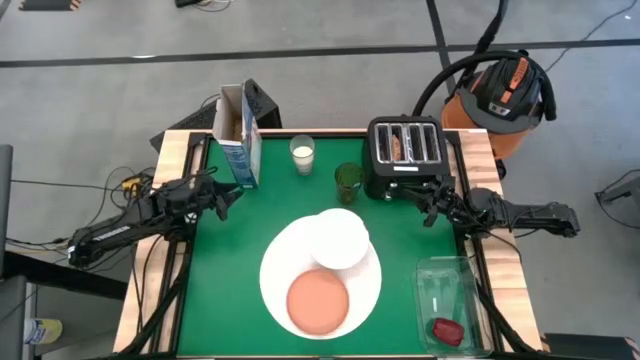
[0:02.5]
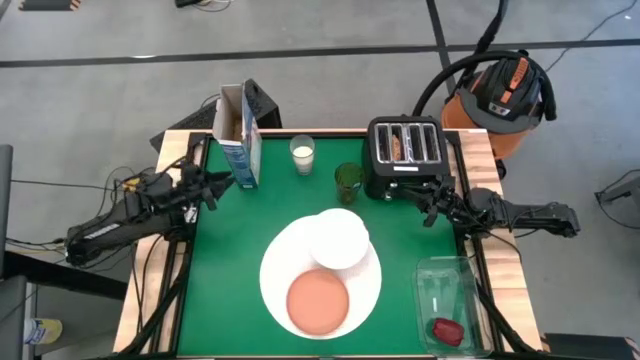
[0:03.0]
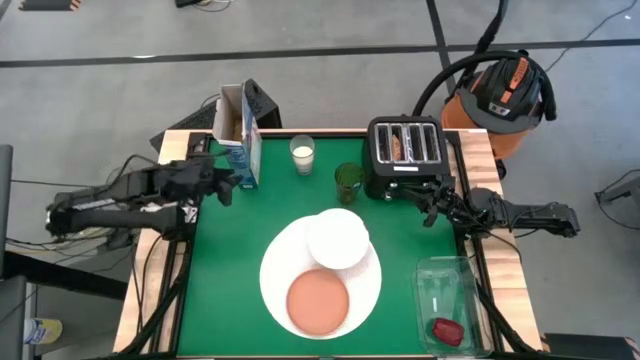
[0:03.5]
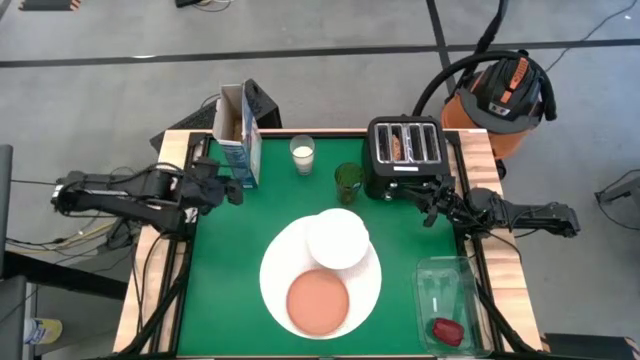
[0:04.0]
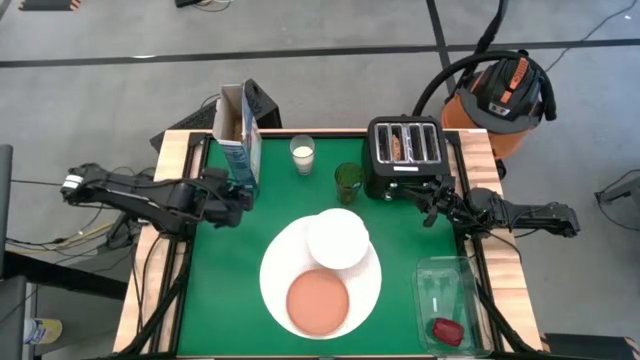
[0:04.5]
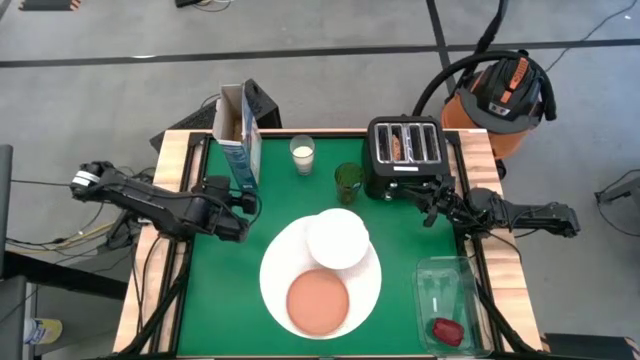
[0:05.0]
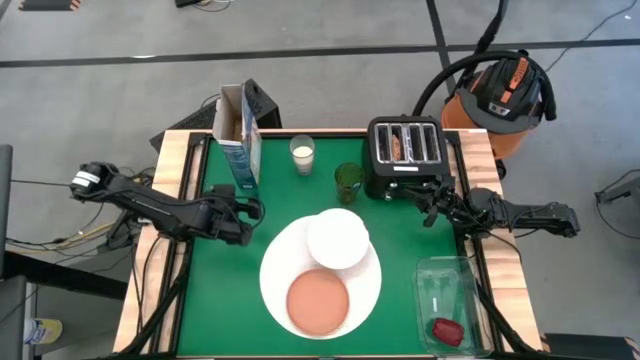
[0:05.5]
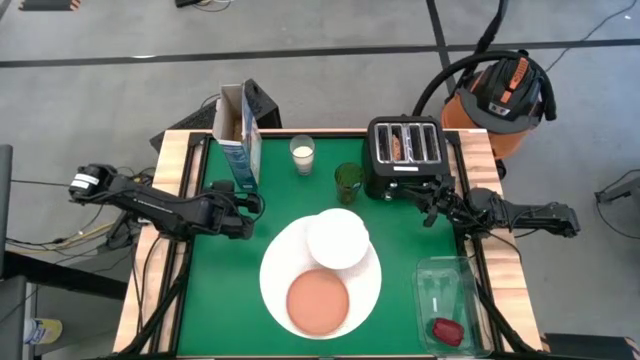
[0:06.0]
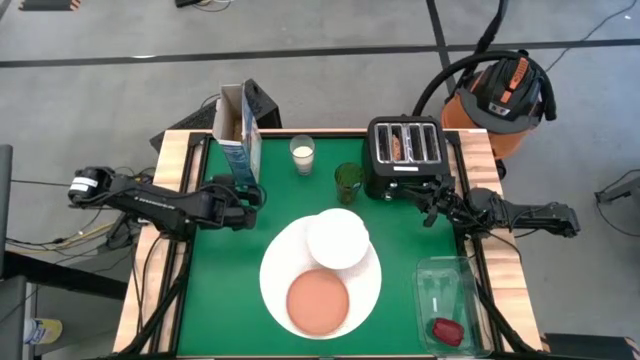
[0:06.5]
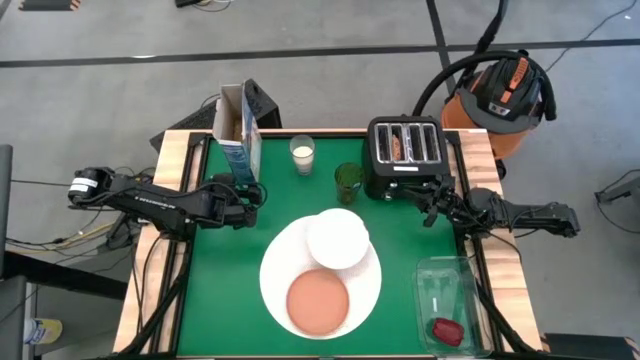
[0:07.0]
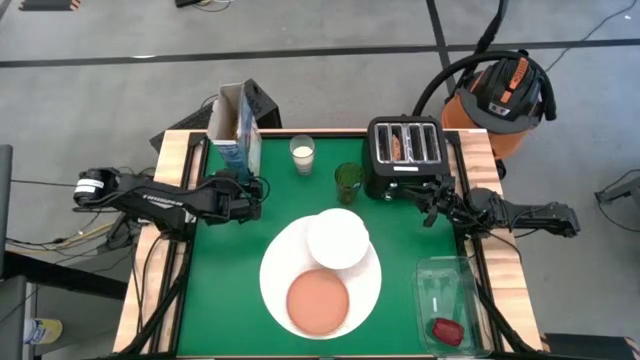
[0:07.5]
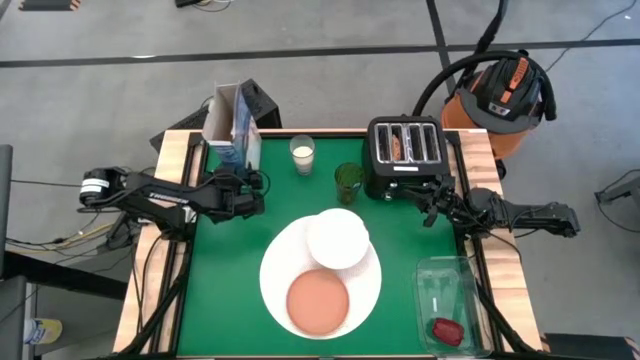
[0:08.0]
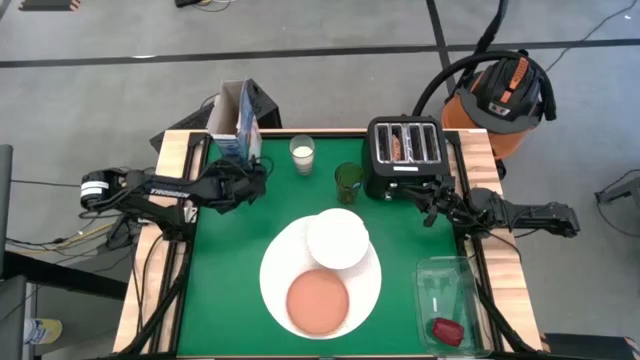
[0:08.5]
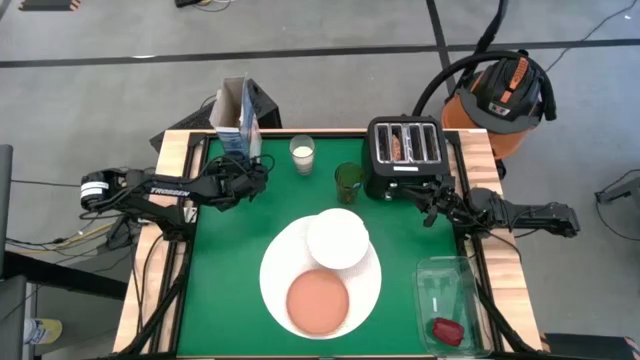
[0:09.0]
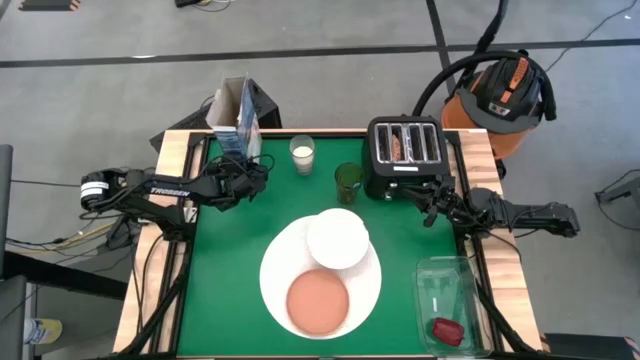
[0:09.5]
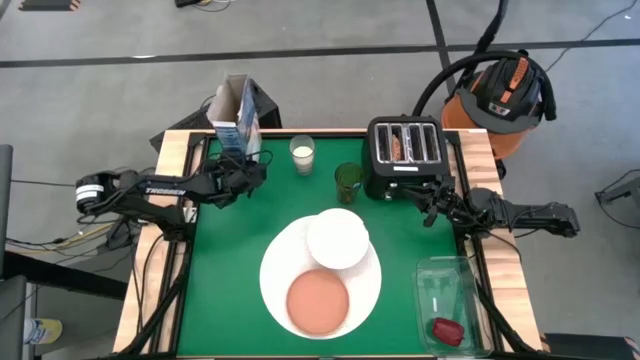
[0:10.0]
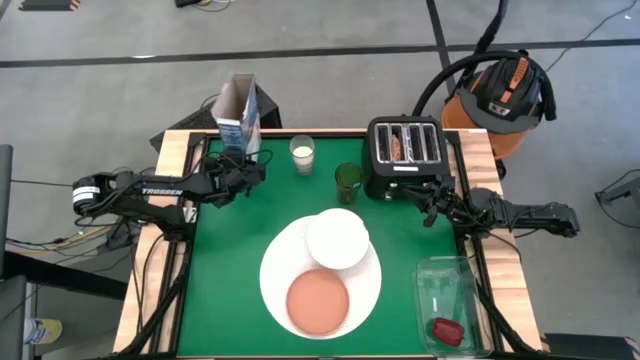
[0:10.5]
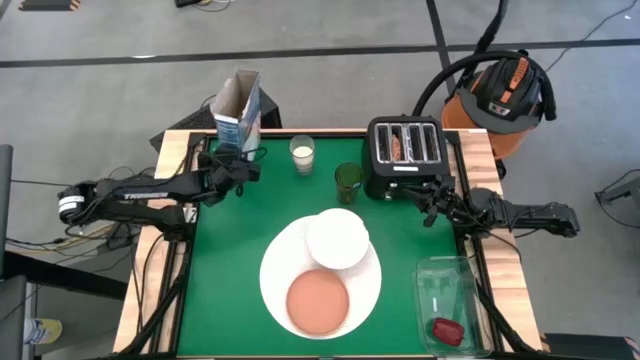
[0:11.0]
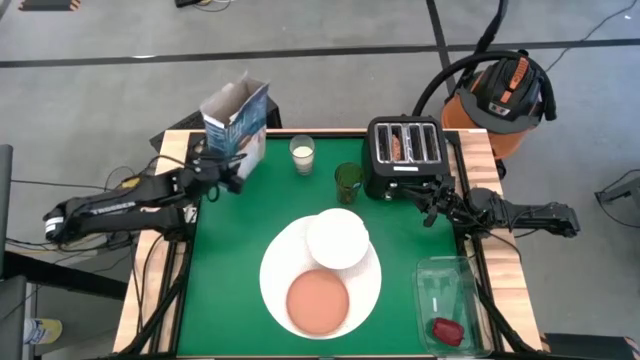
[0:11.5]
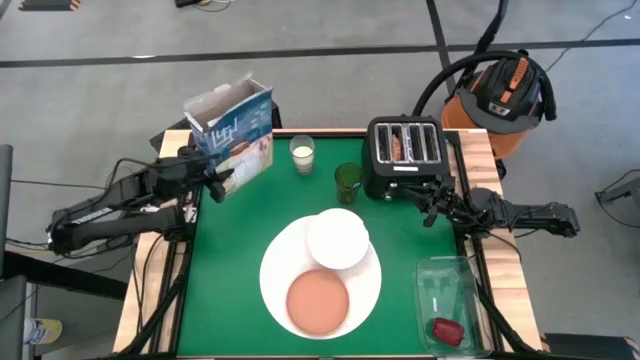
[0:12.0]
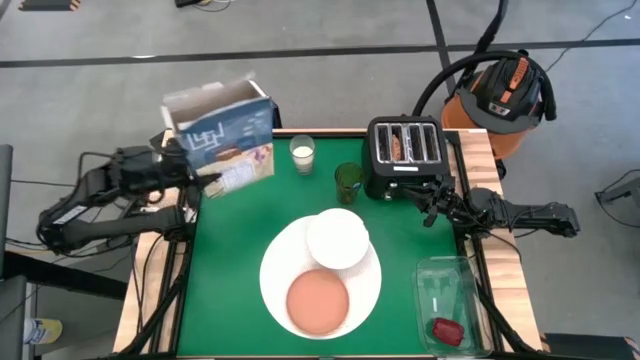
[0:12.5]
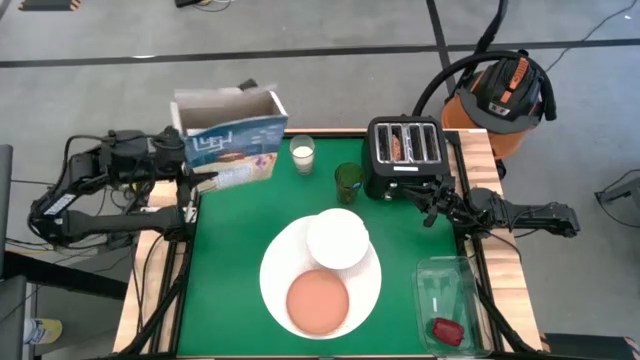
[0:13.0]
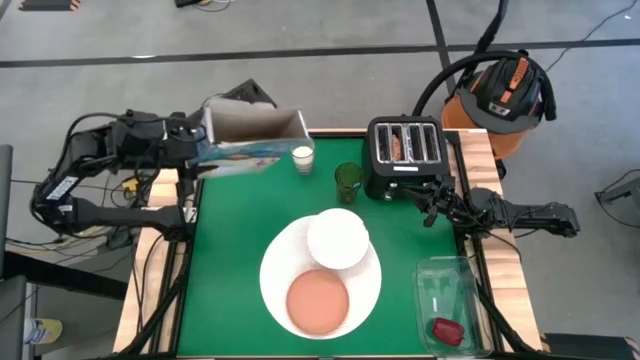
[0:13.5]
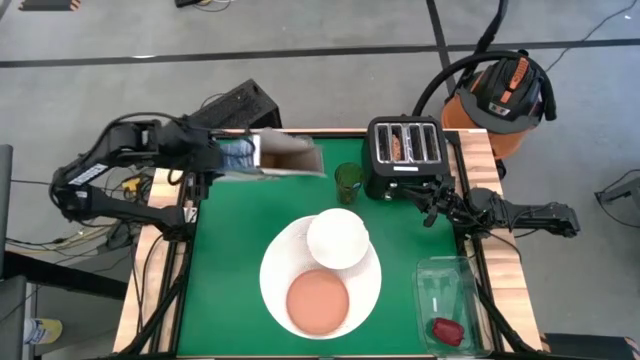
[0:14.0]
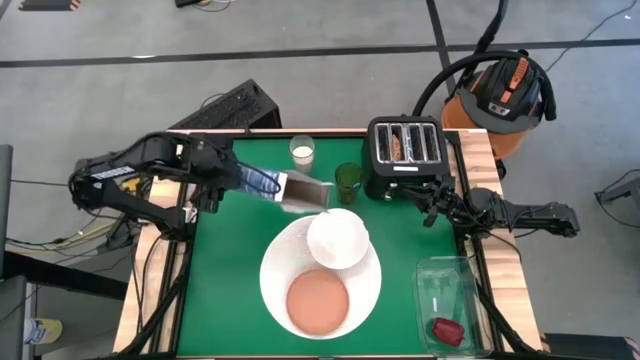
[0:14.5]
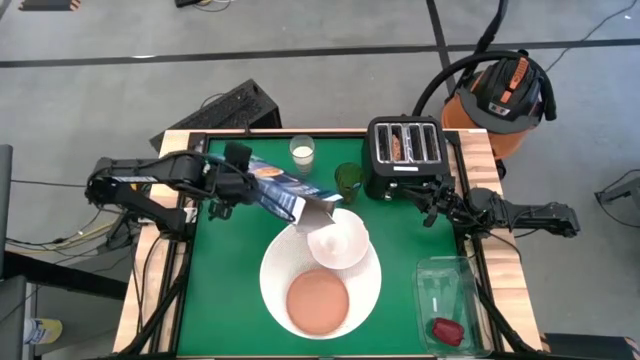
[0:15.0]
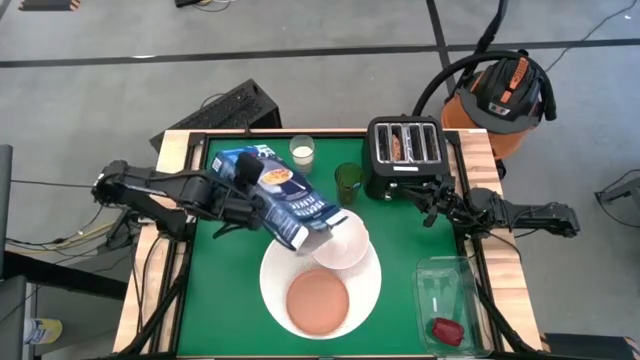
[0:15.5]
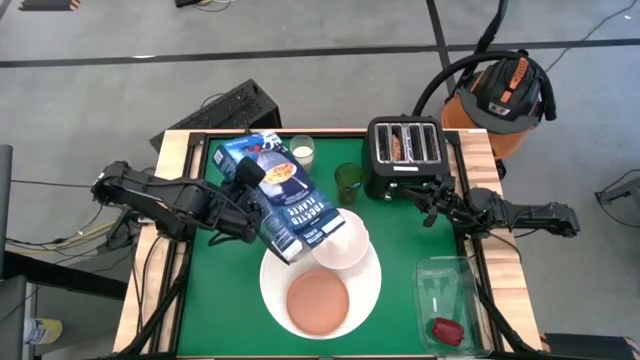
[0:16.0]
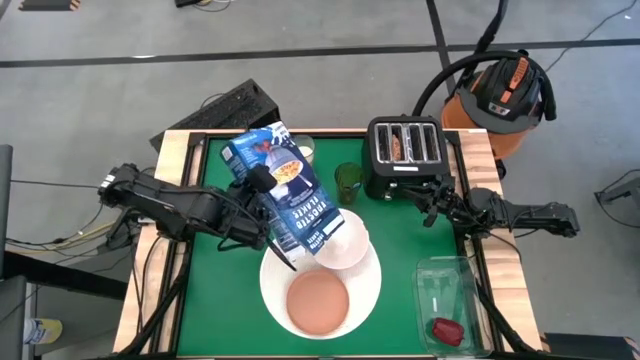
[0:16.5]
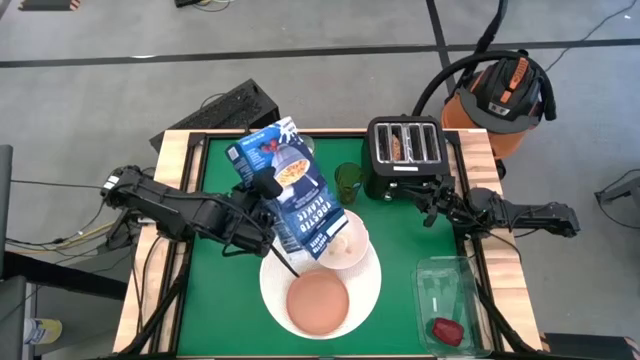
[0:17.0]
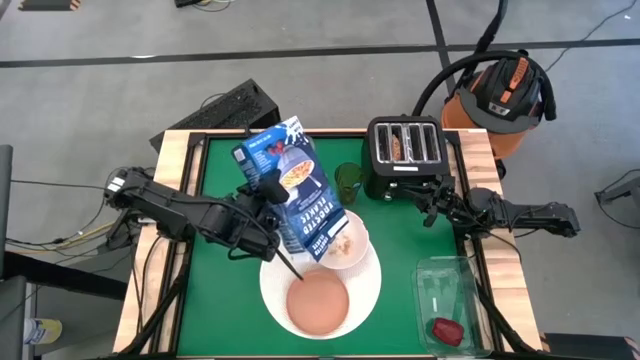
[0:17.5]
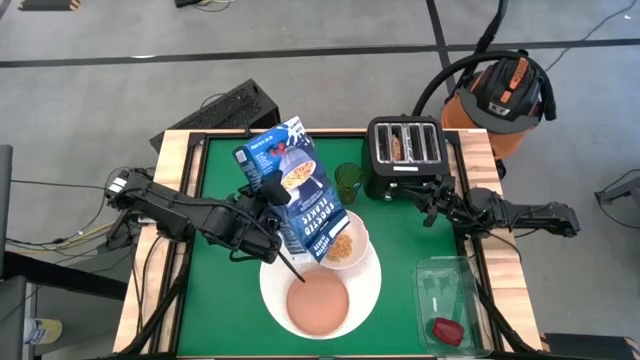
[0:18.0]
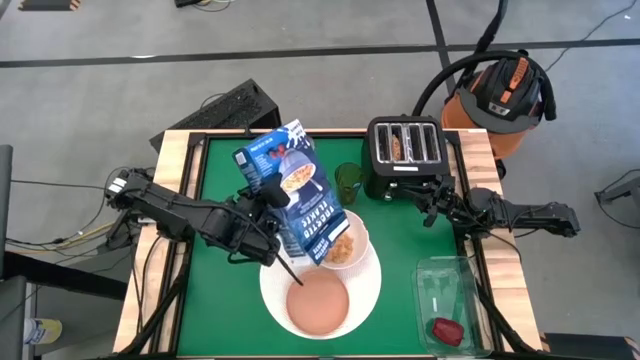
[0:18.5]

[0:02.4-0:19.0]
Task: Arrange a breakfast setting
Pour the cereals from the cereal box into the white bowl

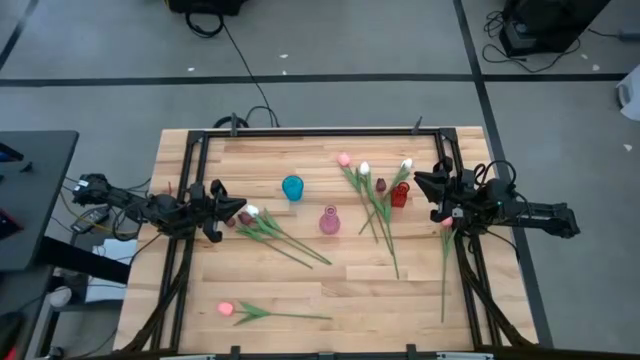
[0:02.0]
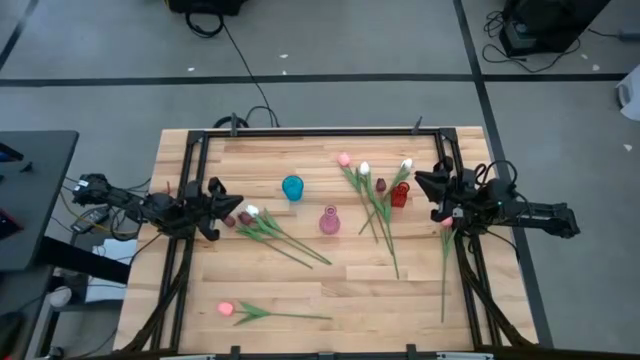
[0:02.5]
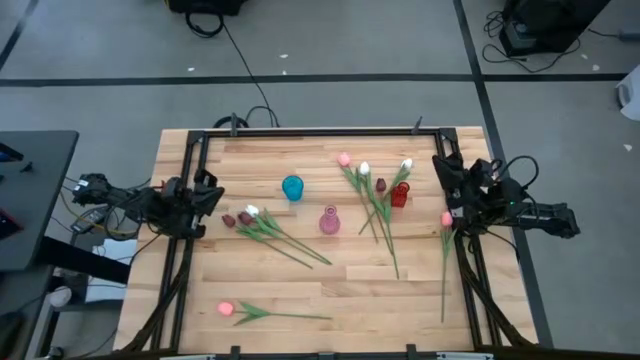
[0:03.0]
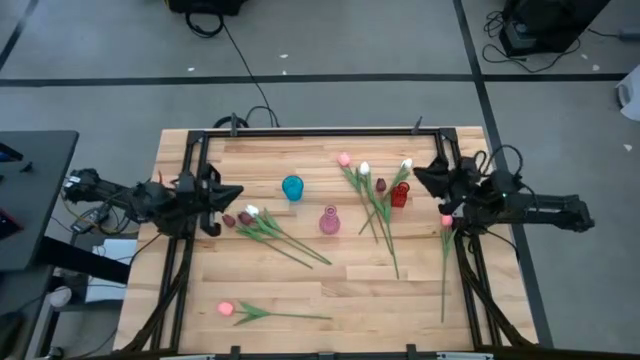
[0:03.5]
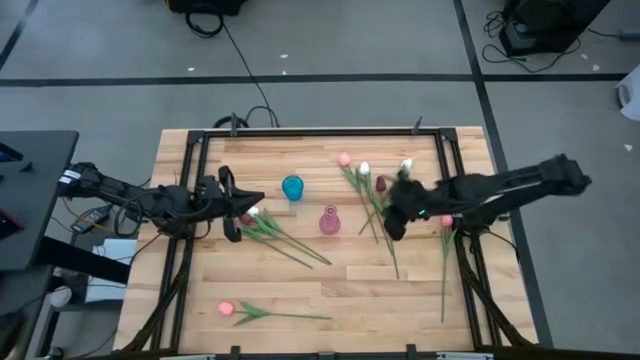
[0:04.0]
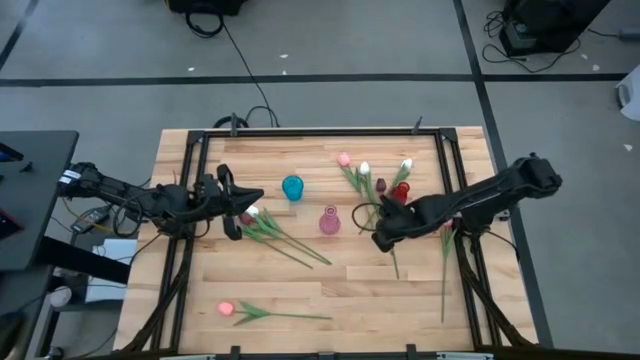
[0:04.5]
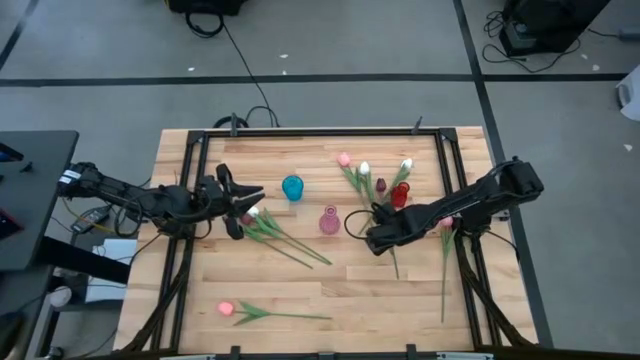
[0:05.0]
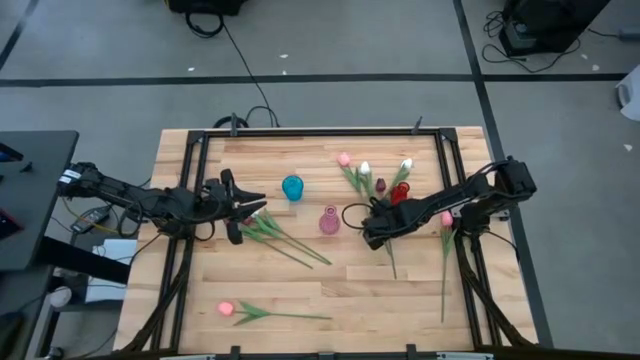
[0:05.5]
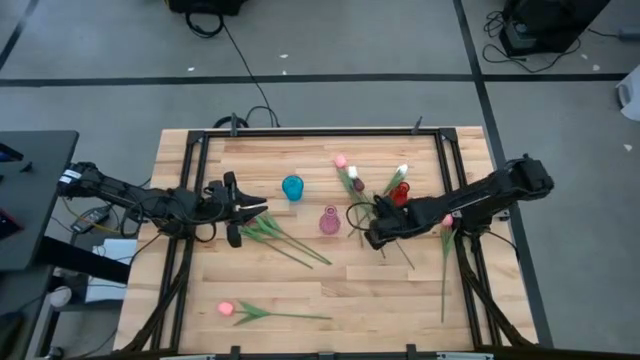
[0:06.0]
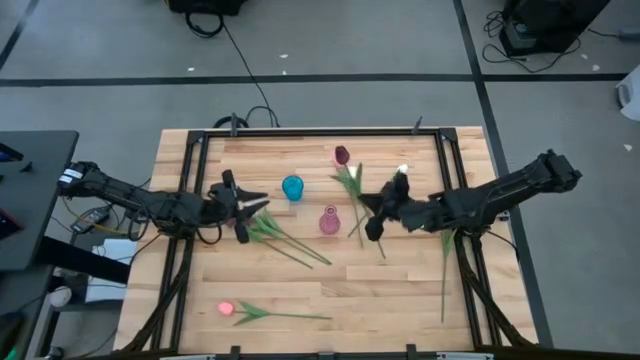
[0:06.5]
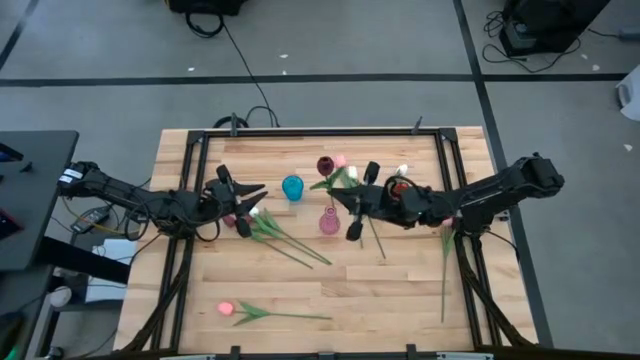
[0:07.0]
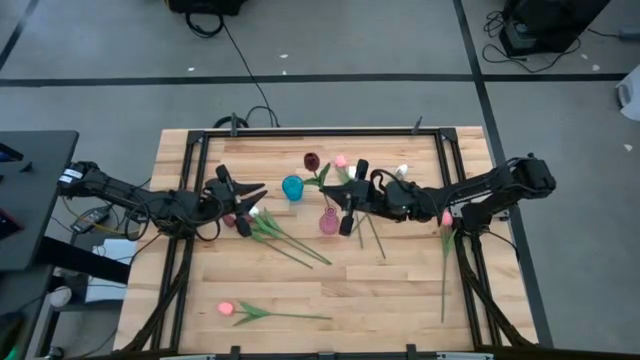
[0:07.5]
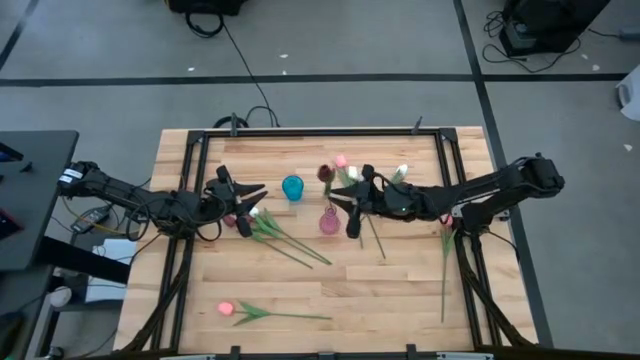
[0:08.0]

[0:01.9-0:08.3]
Task: Sort flowers into vase by color
Put the right red tulip into the pink vase
